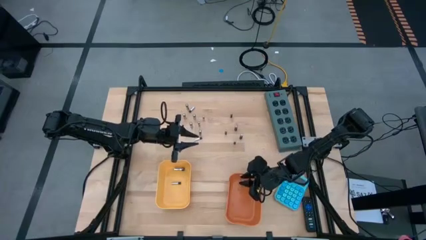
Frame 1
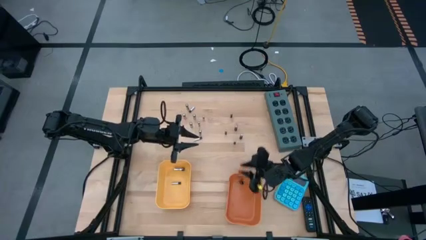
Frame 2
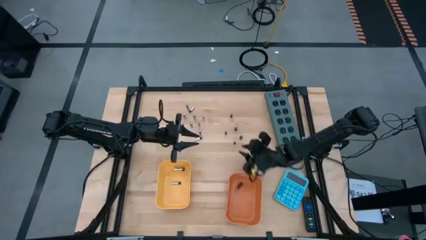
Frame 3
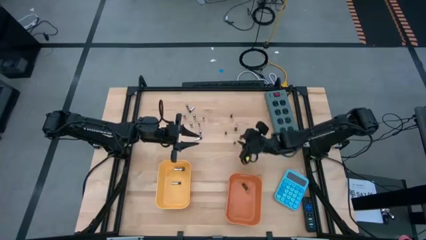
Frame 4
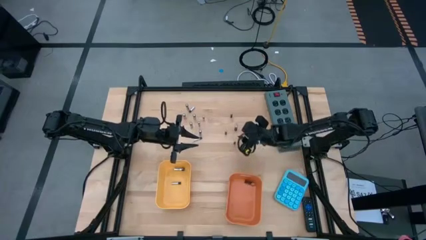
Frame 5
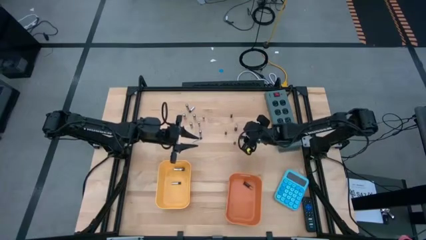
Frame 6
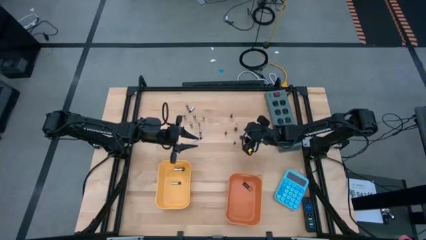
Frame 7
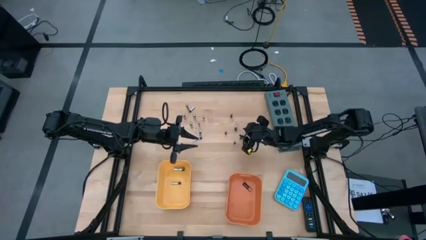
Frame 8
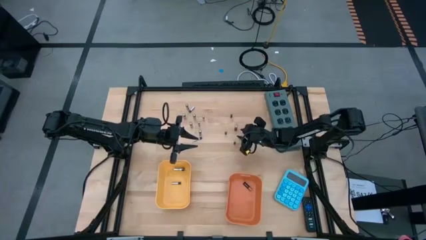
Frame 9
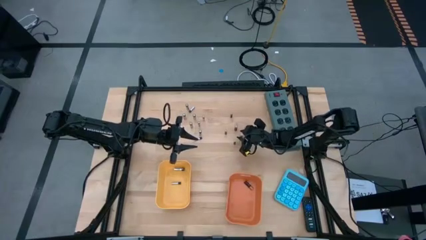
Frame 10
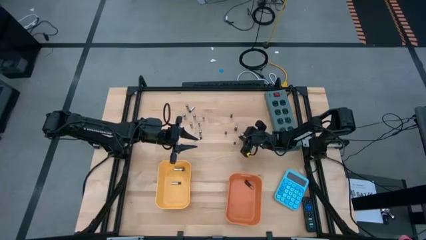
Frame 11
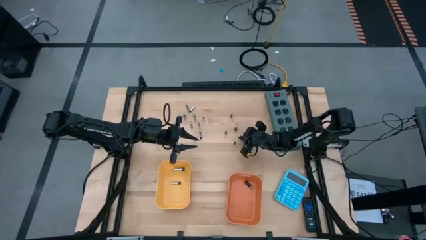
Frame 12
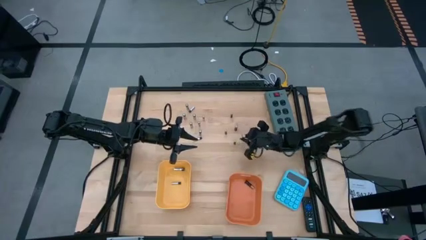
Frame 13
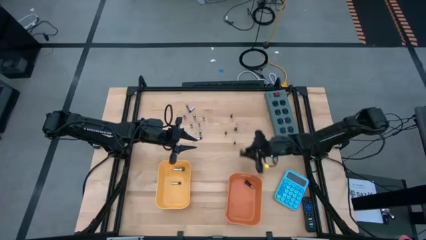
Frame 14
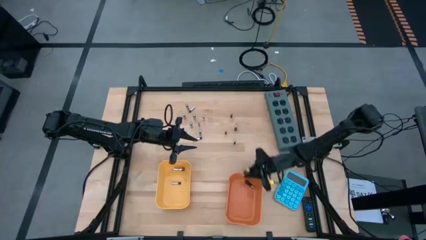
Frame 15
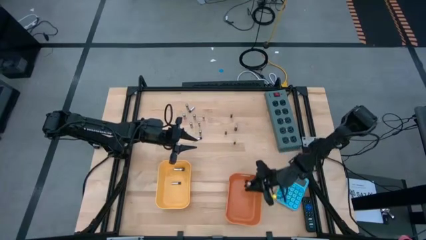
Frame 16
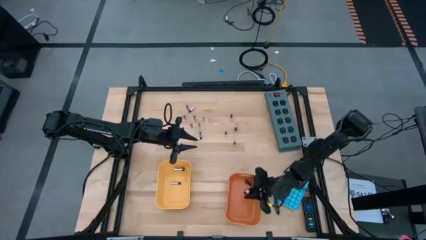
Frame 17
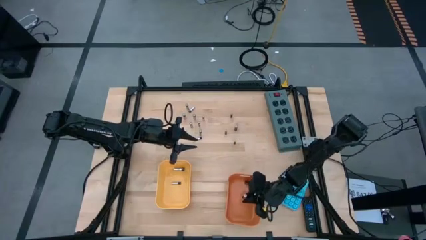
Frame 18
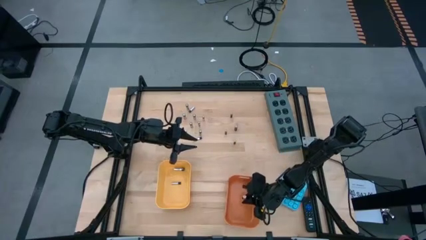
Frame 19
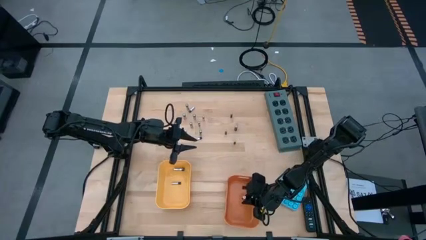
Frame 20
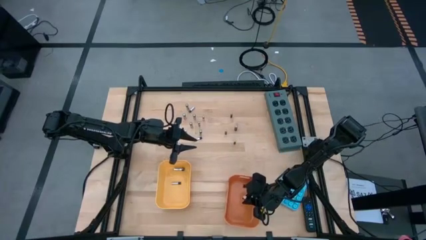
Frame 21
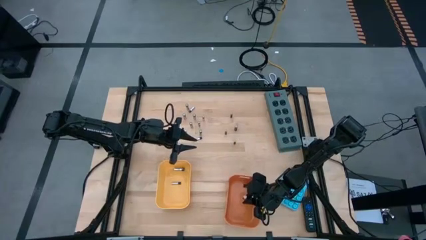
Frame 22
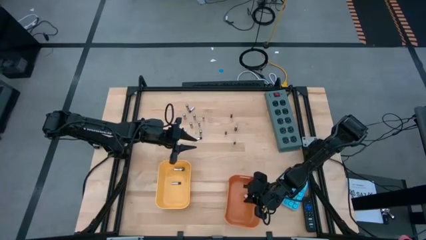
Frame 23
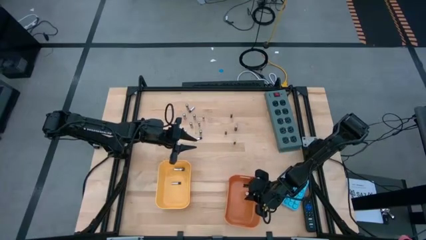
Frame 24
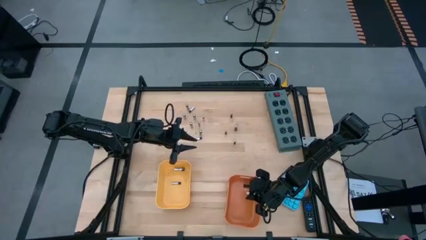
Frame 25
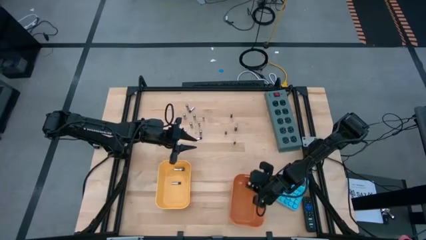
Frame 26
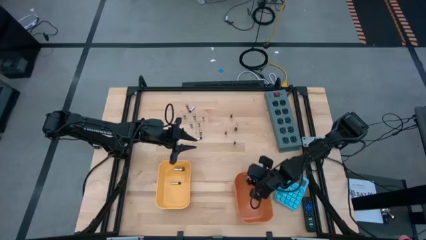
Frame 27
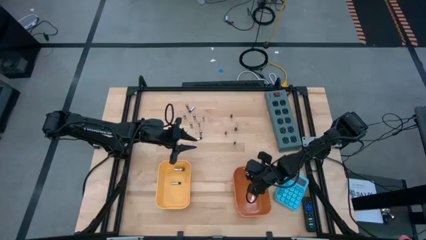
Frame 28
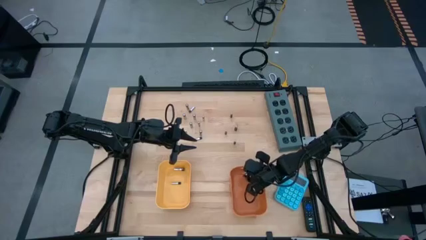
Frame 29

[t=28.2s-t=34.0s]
Task: Sort batteries
Put the black battery into the orange bin

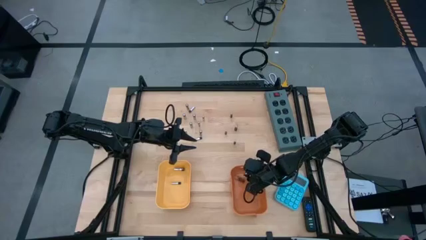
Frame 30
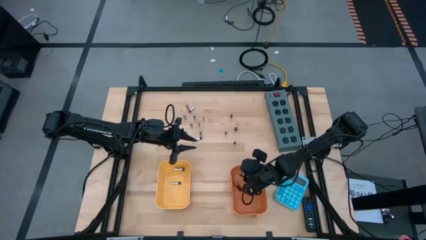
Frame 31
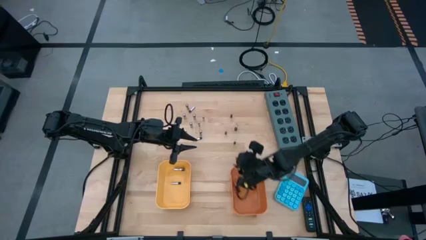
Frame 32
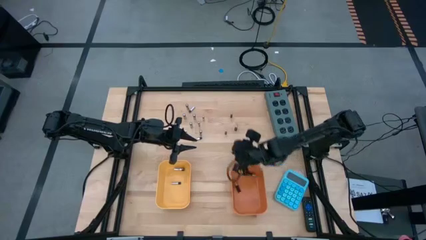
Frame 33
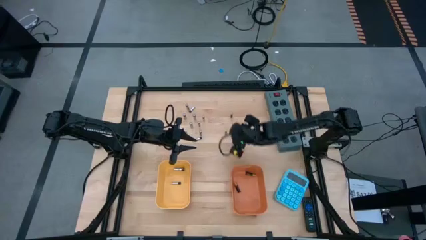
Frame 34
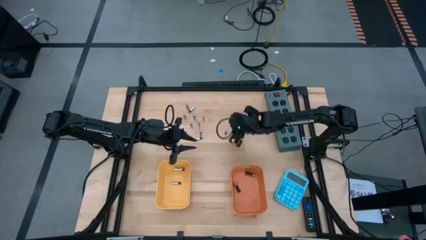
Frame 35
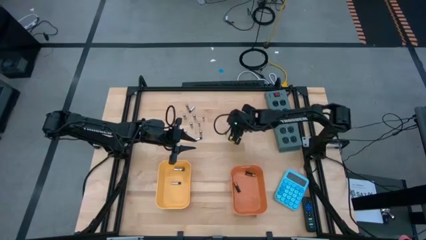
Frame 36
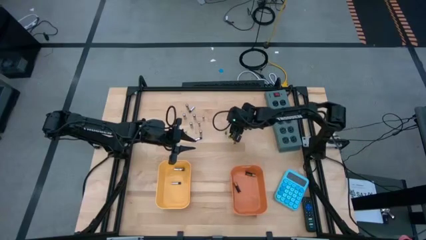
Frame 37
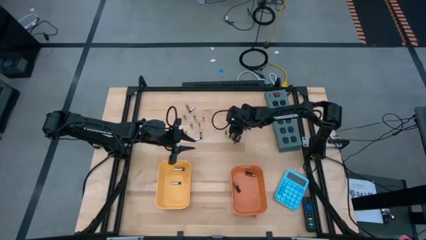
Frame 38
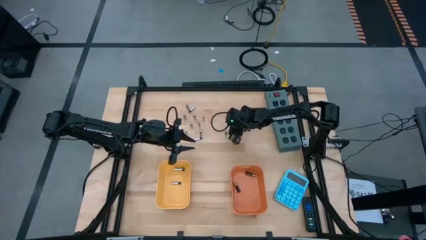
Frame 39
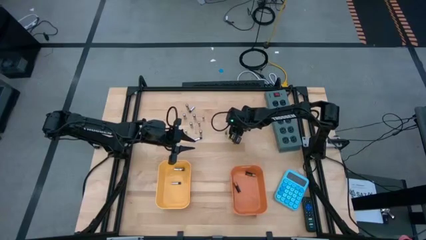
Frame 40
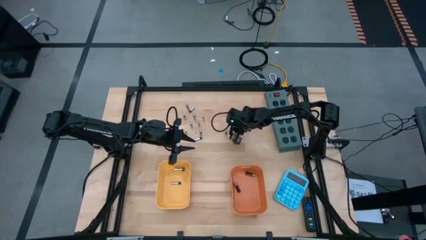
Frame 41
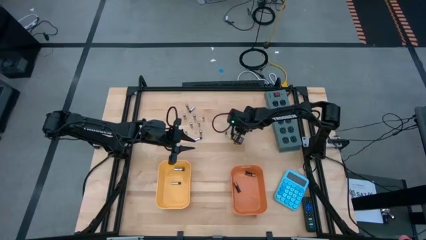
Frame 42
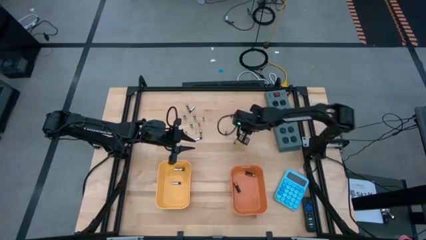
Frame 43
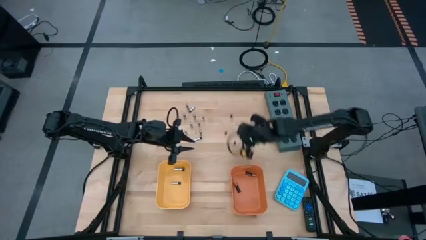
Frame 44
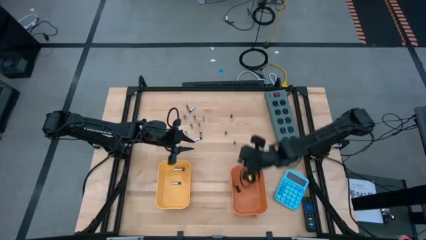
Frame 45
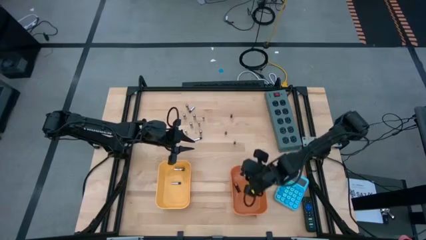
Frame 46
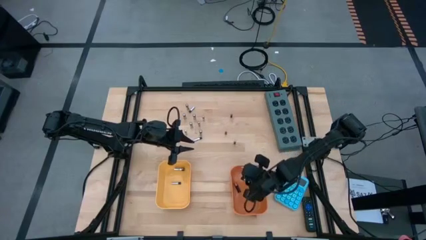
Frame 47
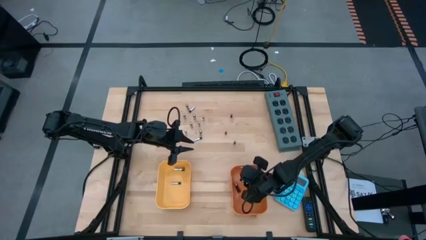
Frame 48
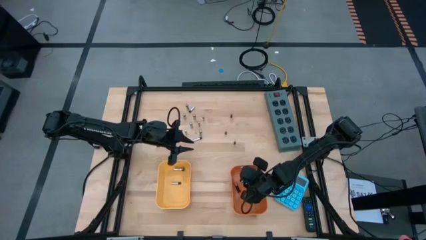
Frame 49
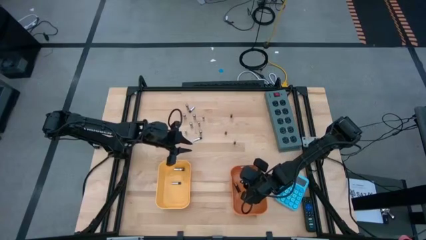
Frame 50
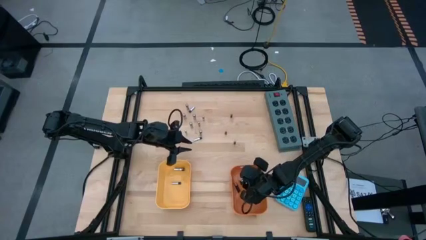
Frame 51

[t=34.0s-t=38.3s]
Put the black battery into the orange bin

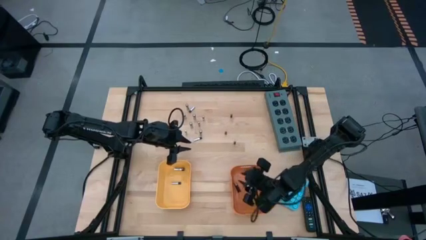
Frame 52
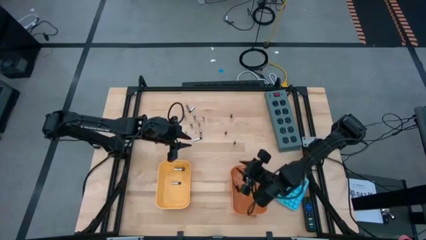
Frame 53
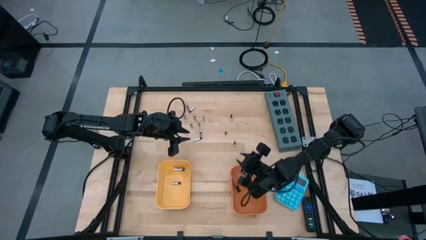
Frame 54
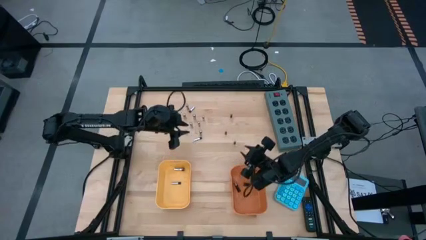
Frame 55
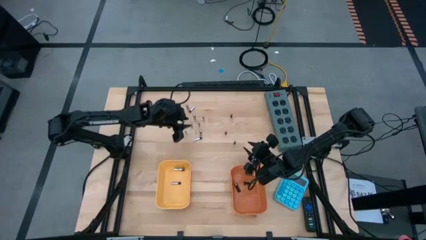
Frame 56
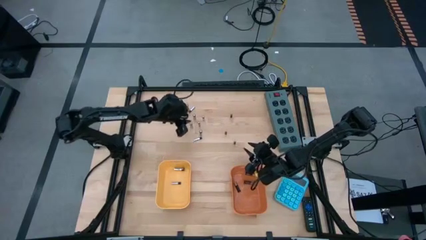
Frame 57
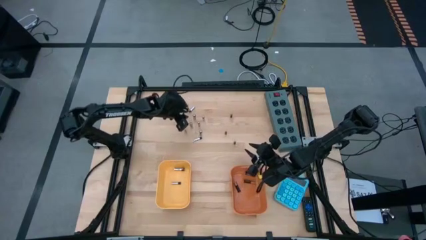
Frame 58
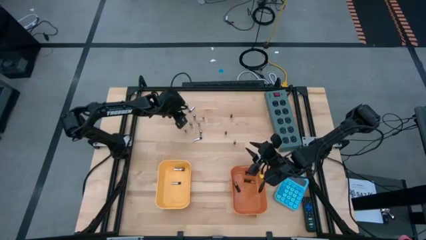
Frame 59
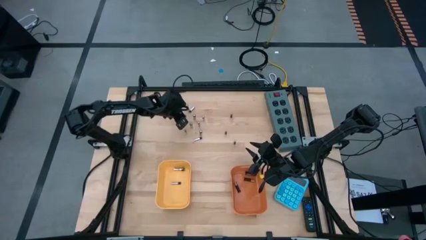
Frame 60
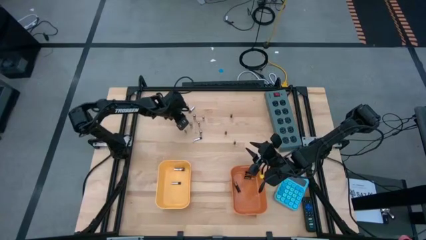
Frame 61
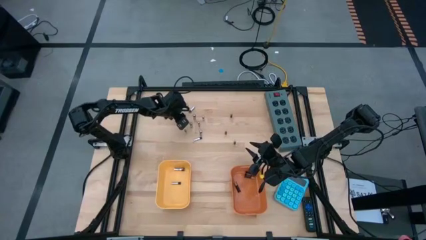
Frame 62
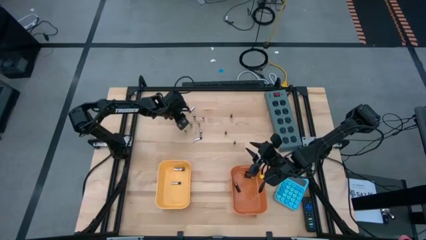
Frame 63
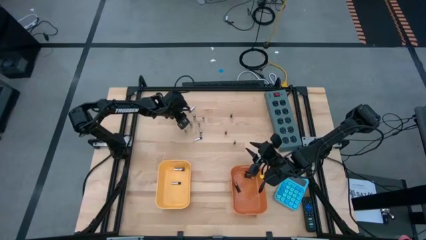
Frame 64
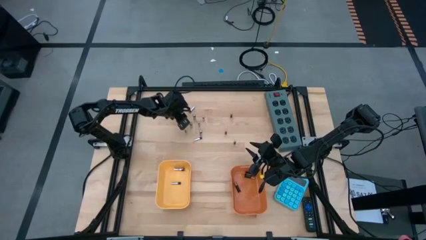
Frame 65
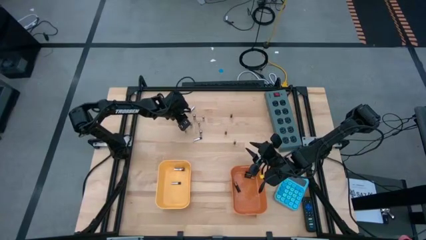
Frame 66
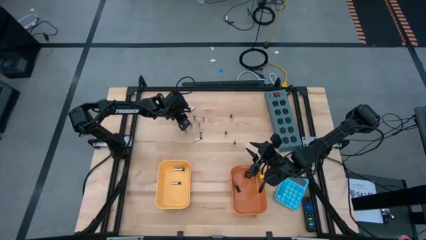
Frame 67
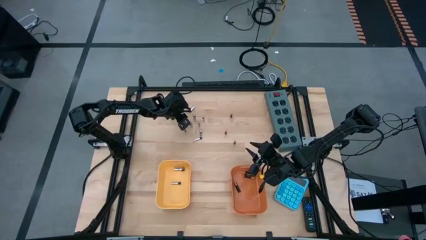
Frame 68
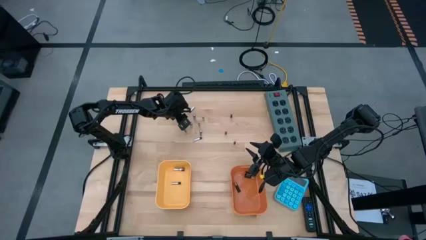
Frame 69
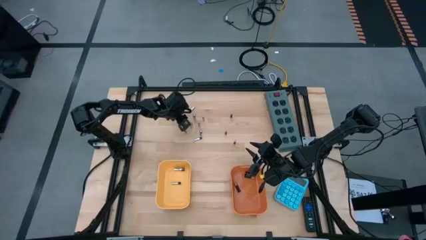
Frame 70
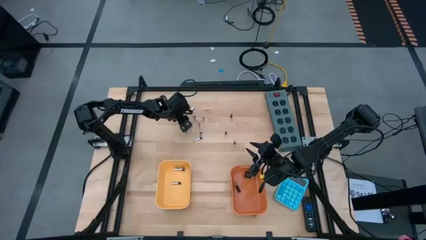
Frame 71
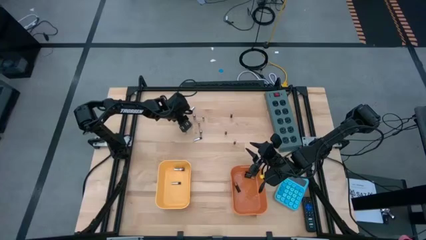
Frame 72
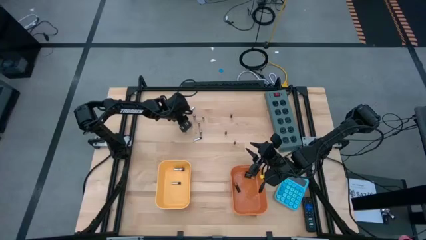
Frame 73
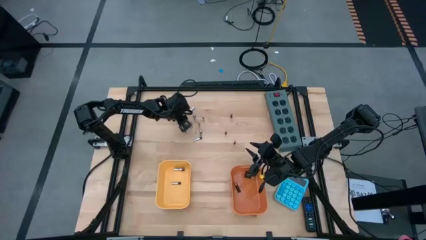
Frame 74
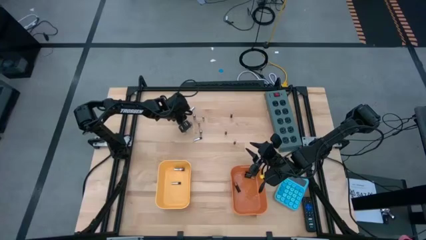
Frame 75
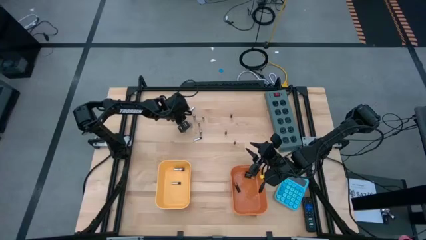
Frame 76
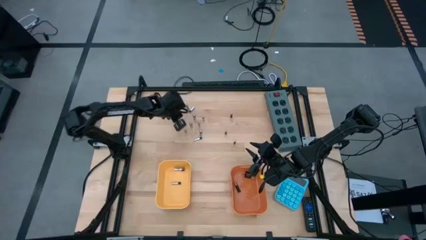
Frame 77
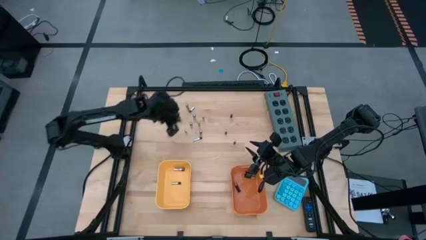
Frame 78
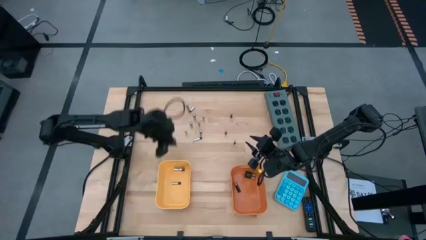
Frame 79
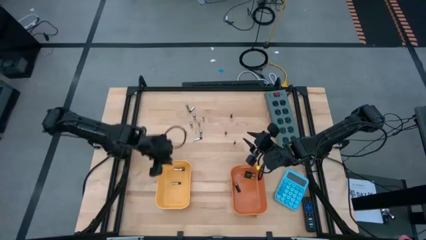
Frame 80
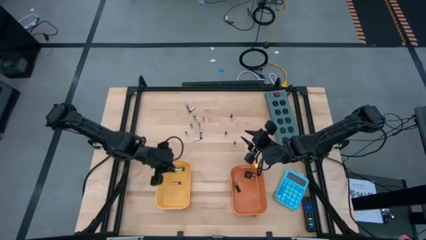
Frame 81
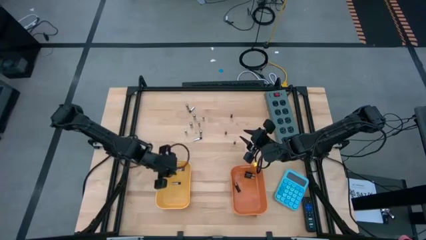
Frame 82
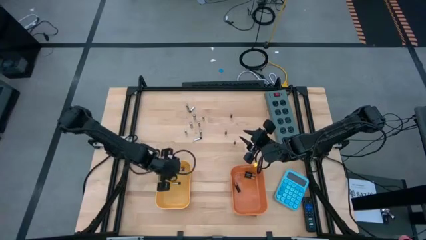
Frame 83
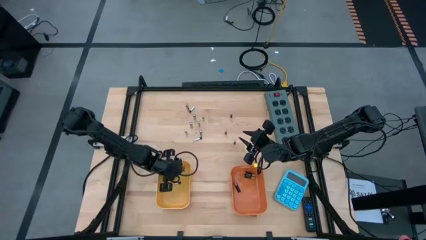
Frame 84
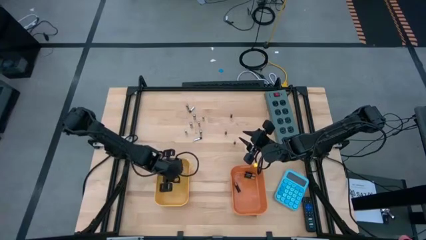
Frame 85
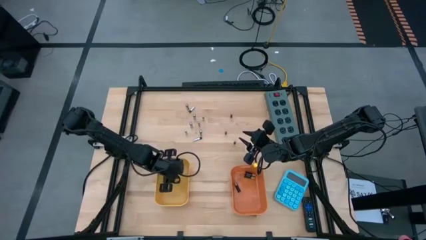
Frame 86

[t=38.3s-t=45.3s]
Put the silver battery into the yellow bin

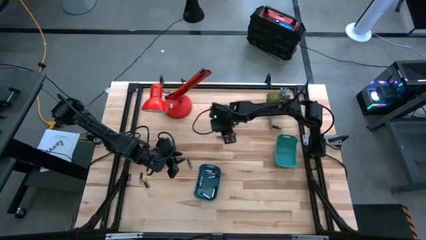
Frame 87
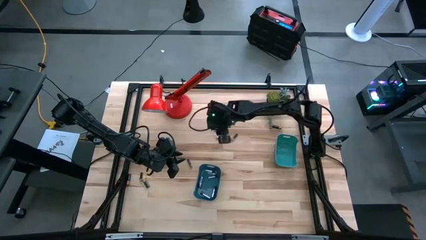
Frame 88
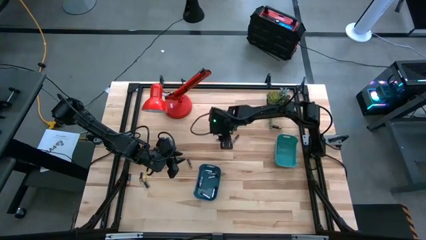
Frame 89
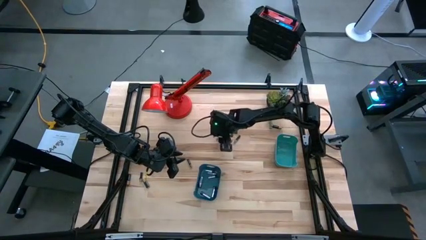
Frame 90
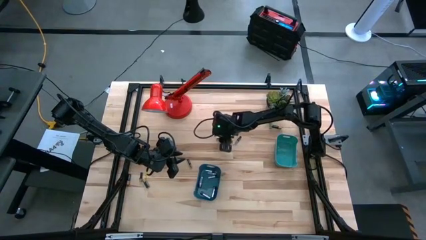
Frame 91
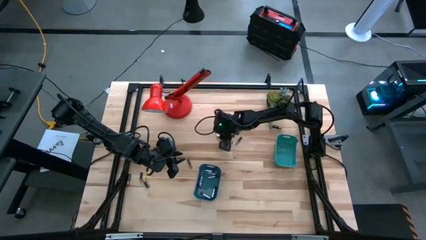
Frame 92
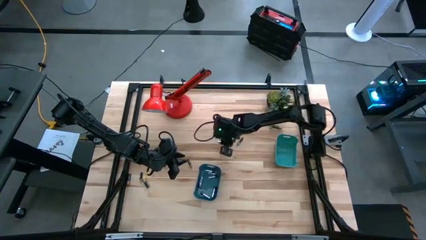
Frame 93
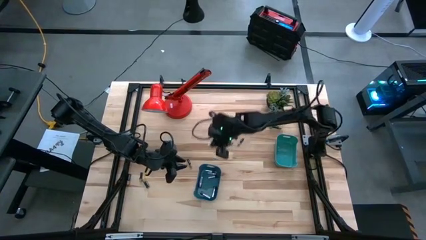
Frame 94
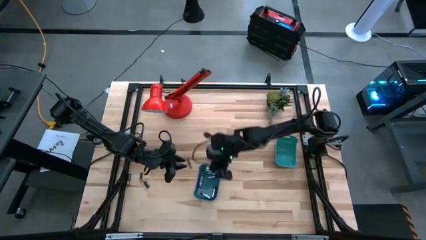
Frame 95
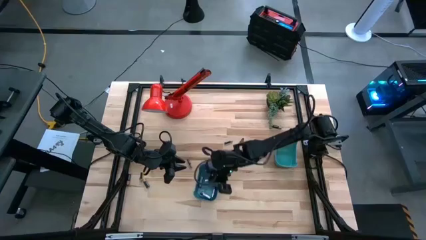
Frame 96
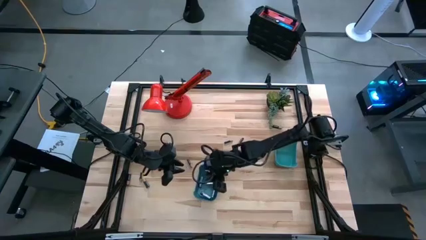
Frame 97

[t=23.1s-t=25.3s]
Task: Sort batteries
Put the silver battery into the blue bin
